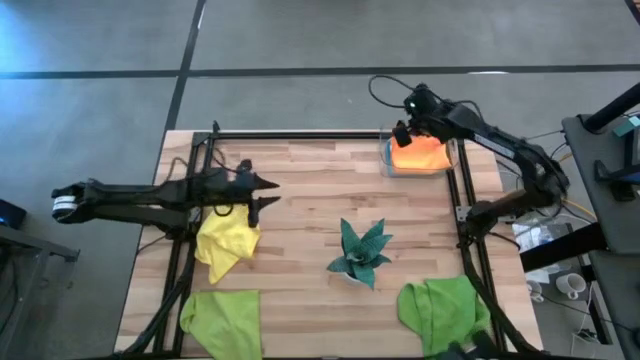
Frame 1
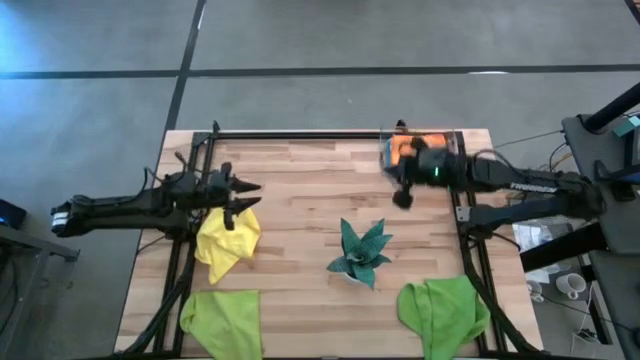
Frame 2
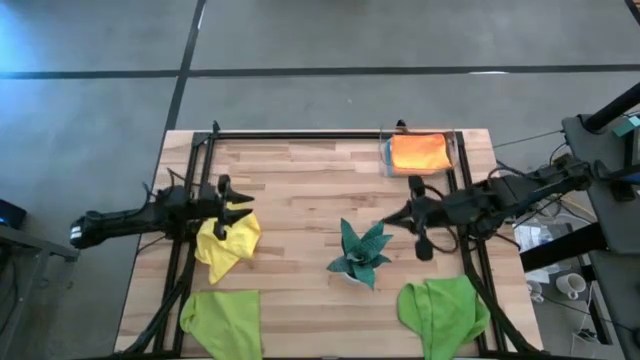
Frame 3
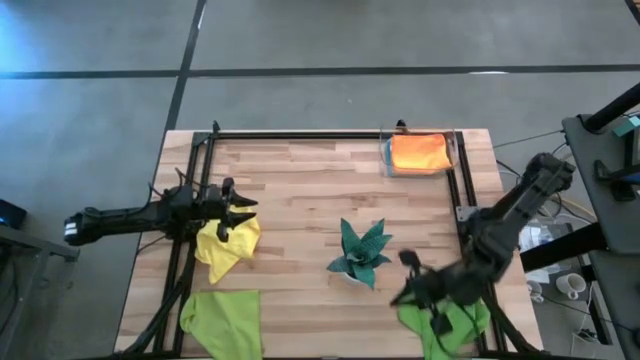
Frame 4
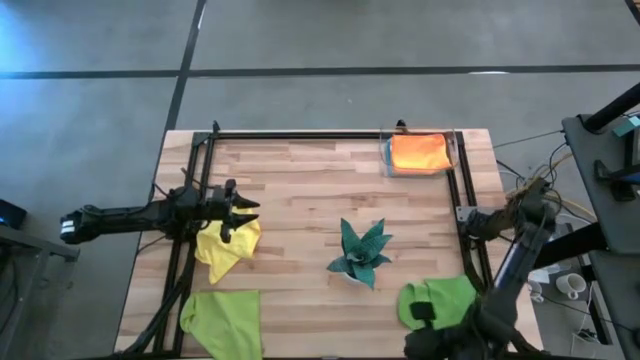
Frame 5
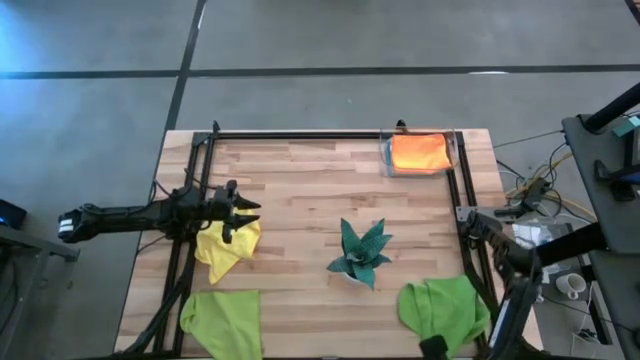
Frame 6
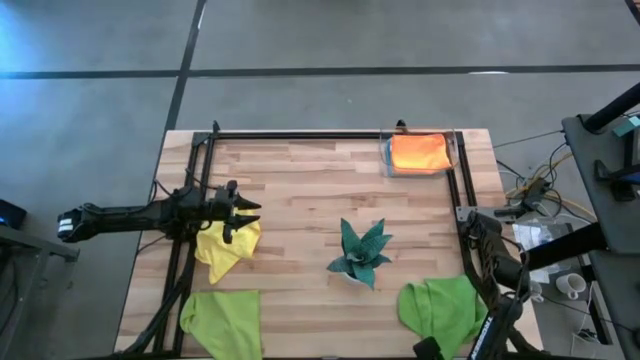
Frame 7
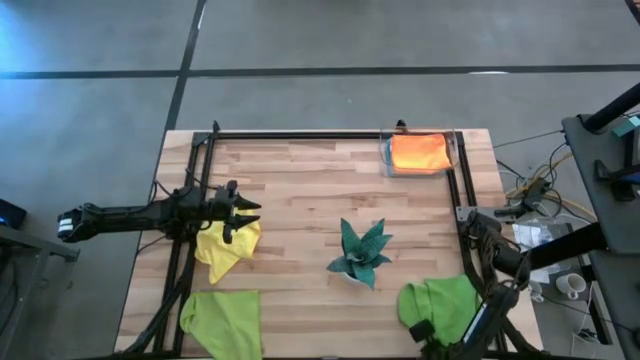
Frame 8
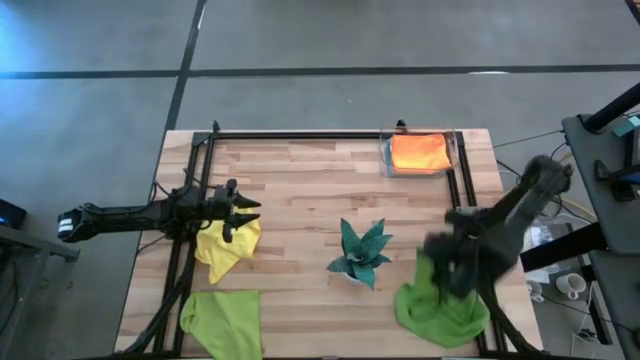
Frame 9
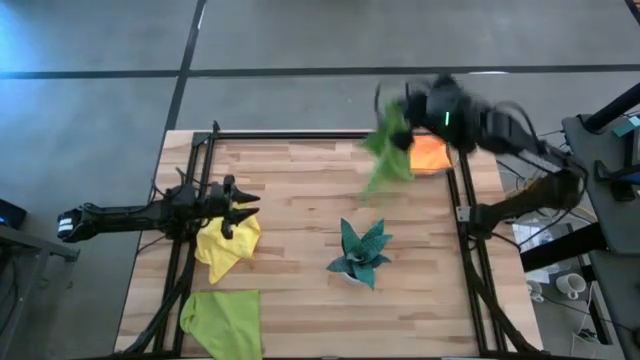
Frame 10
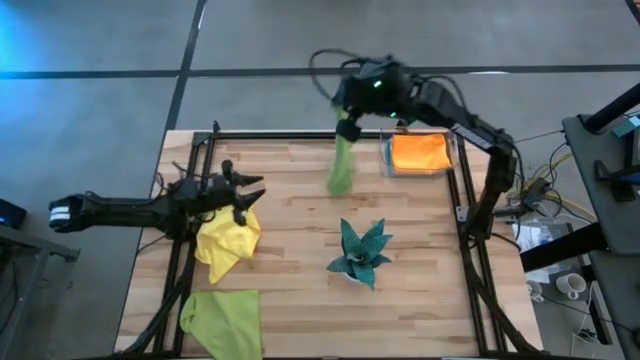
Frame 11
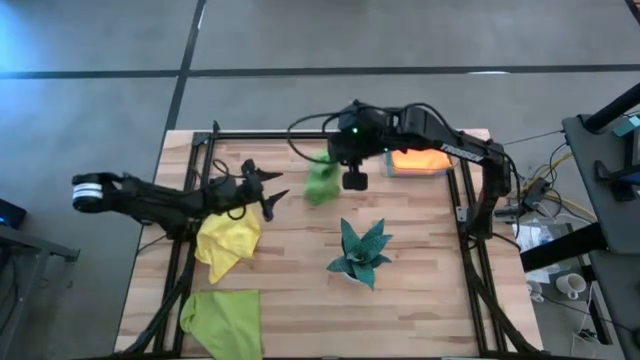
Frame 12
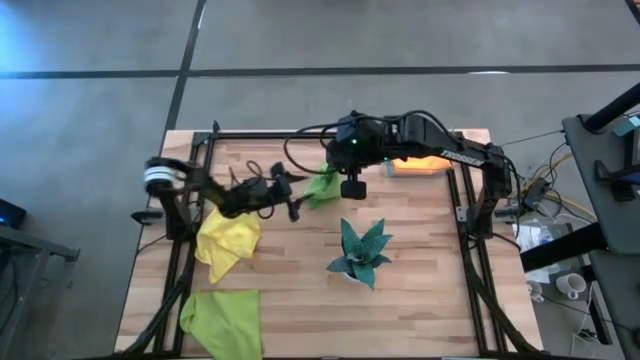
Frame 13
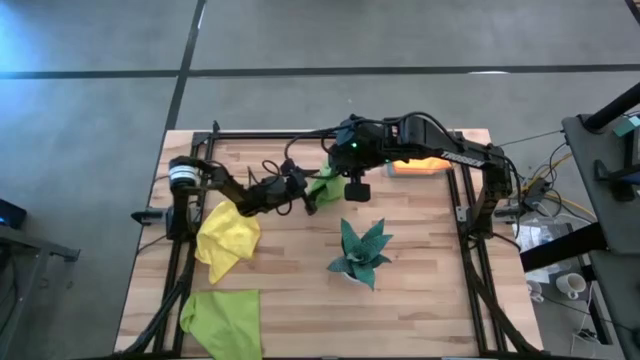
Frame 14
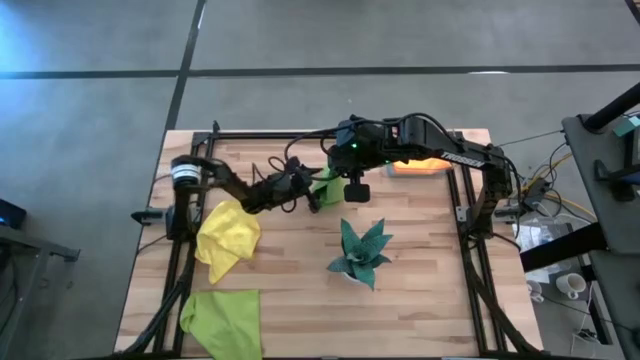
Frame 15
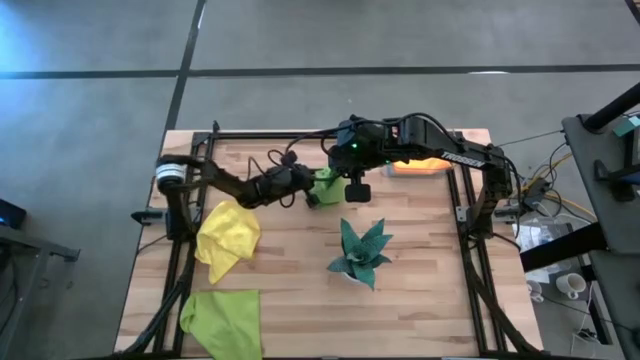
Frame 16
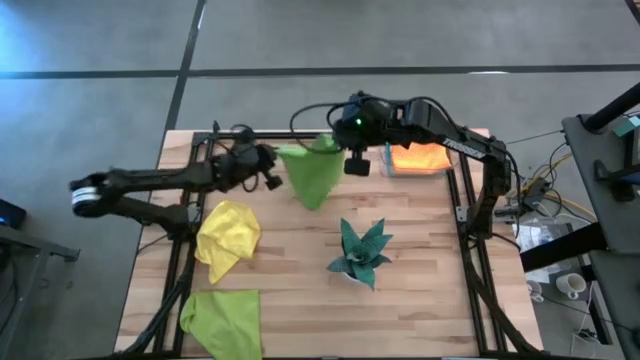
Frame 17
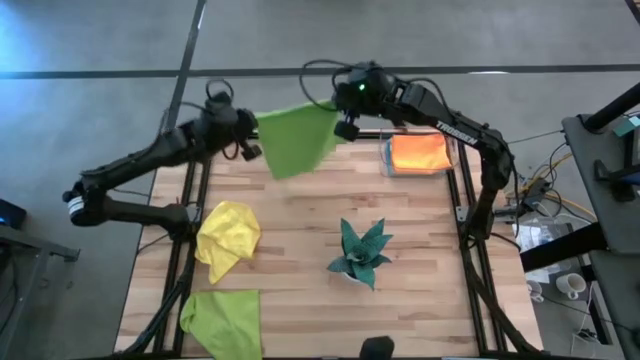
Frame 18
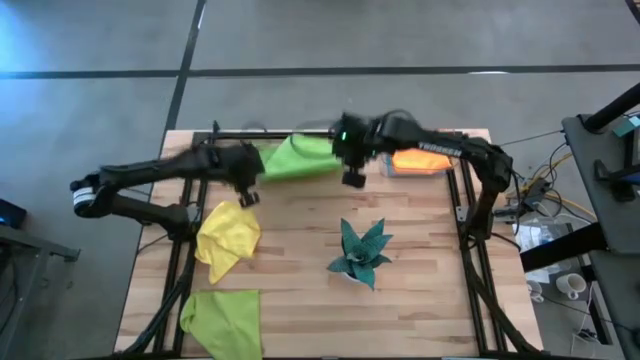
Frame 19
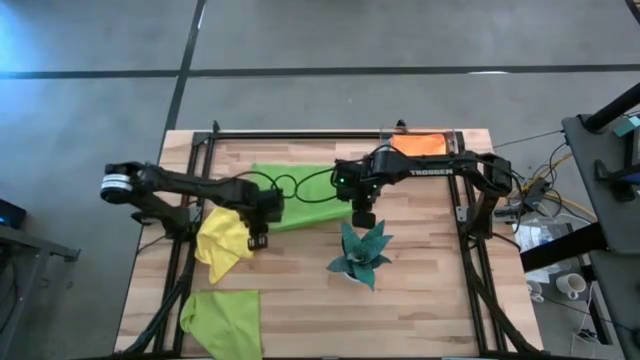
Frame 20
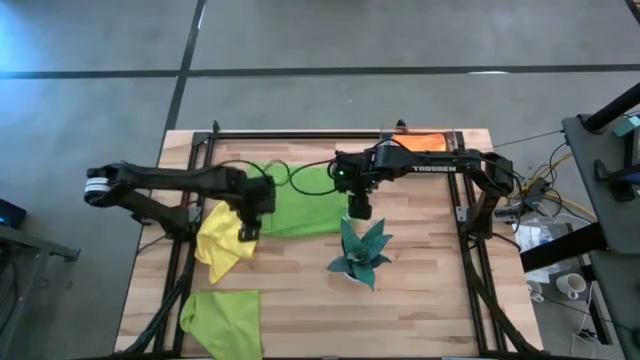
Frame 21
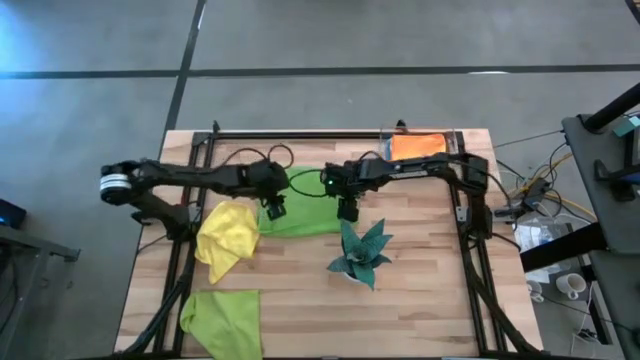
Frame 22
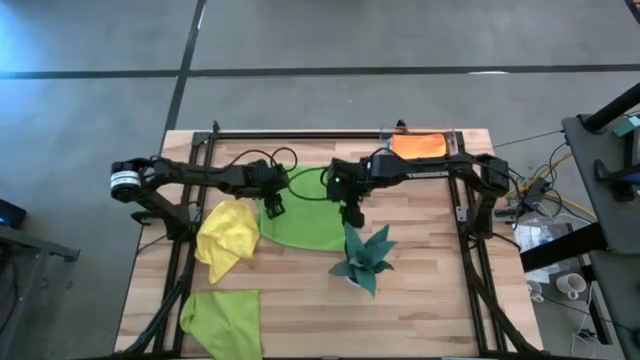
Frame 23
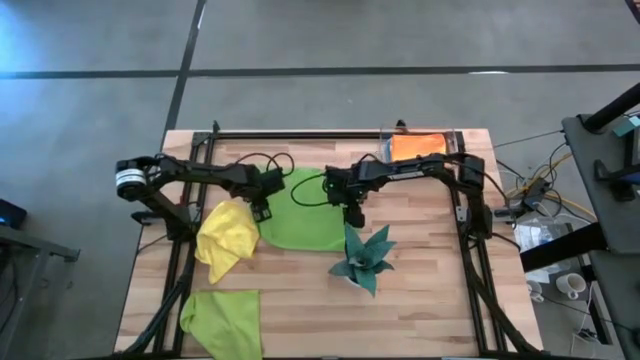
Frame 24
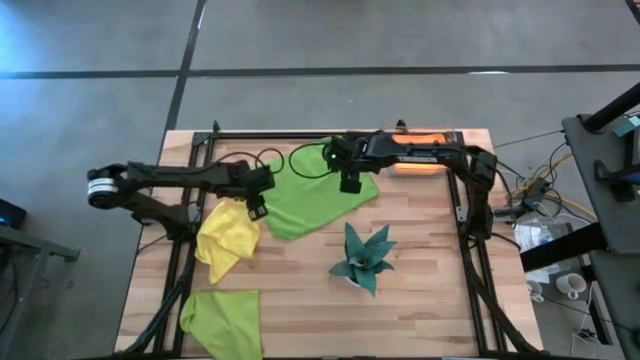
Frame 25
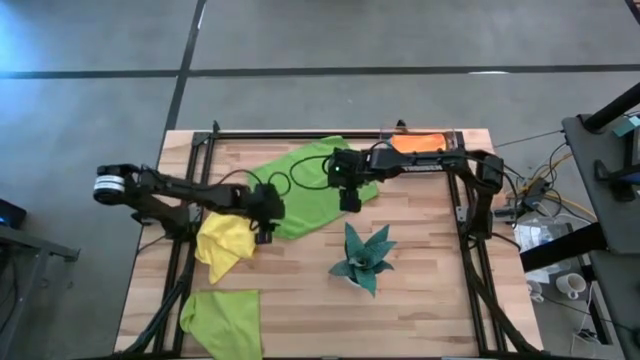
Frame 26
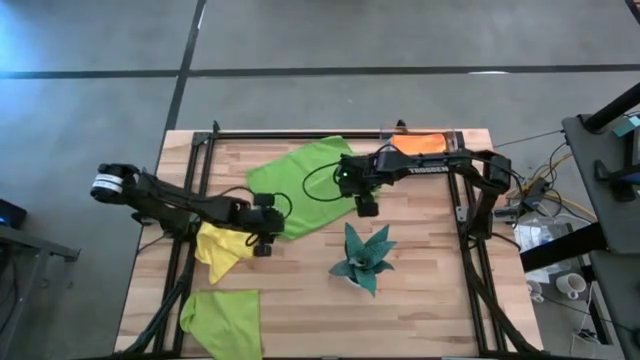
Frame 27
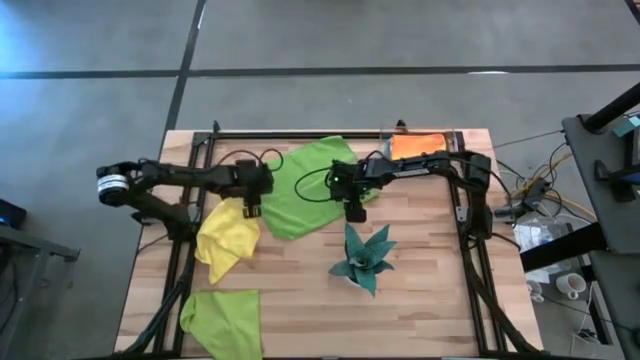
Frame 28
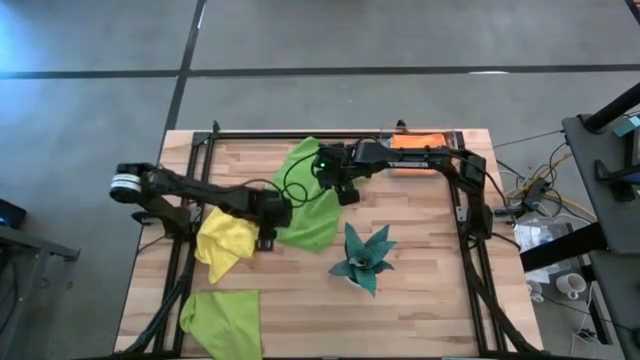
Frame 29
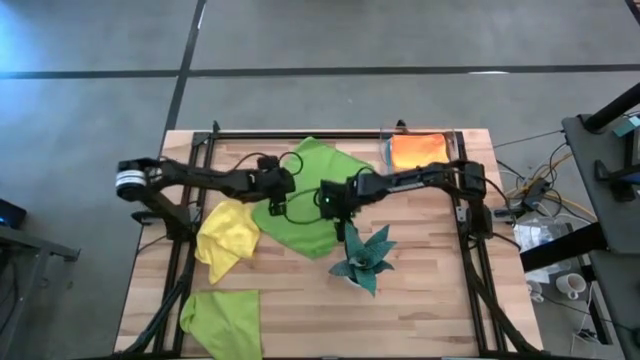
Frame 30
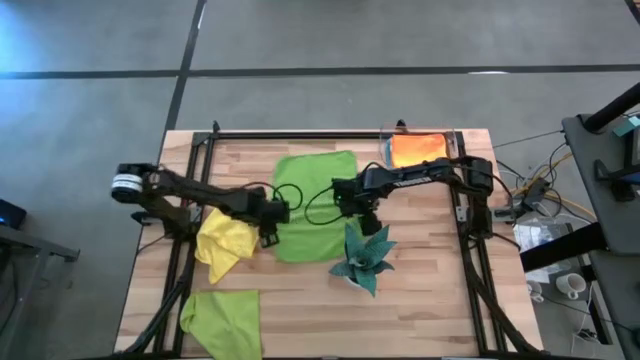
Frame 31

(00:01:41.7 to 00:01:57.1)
Task: Fold microfiber towels
Fold the green microfiber cloth

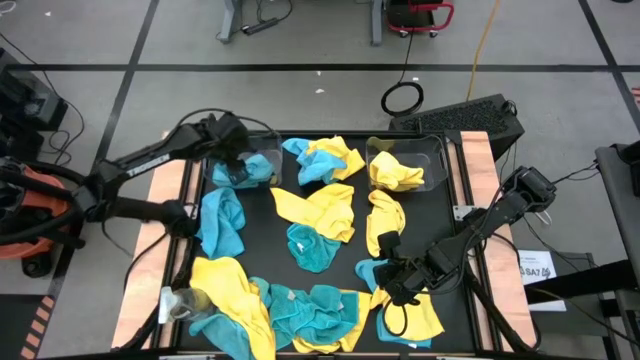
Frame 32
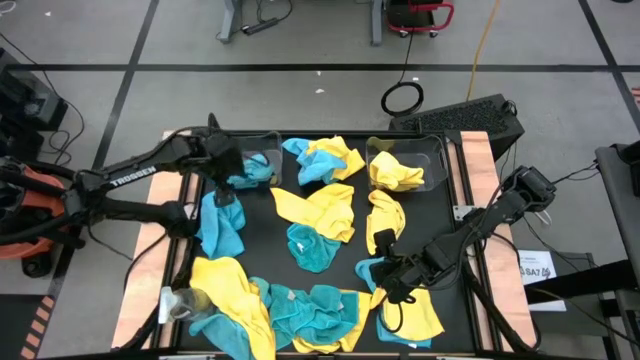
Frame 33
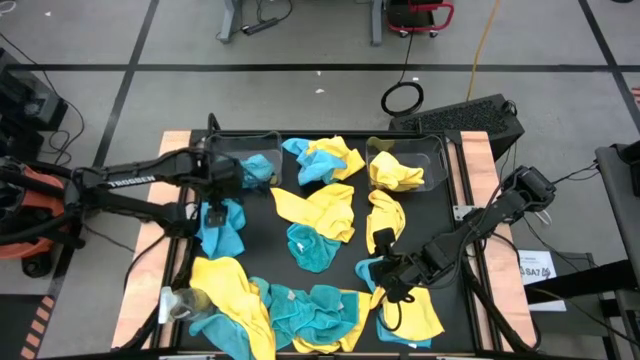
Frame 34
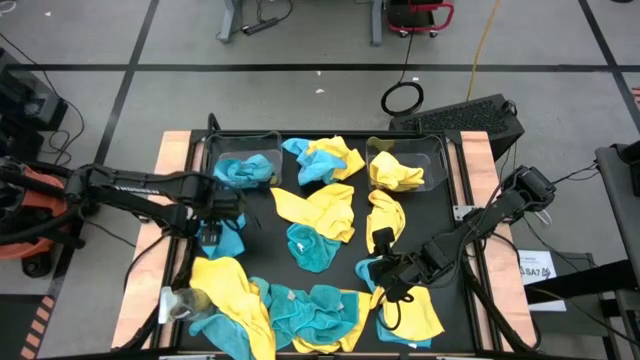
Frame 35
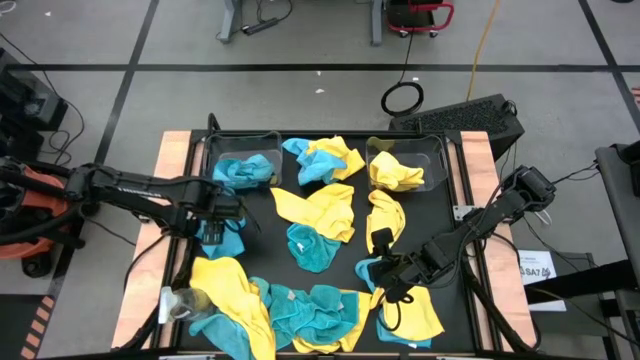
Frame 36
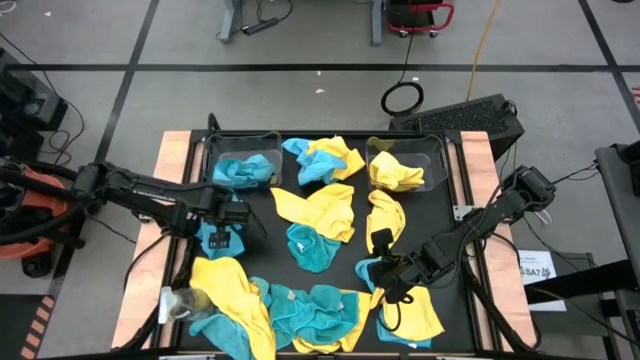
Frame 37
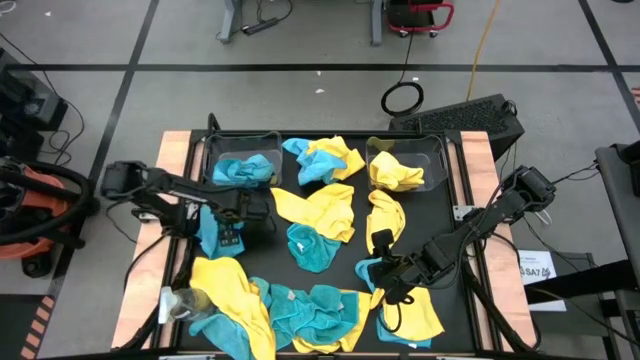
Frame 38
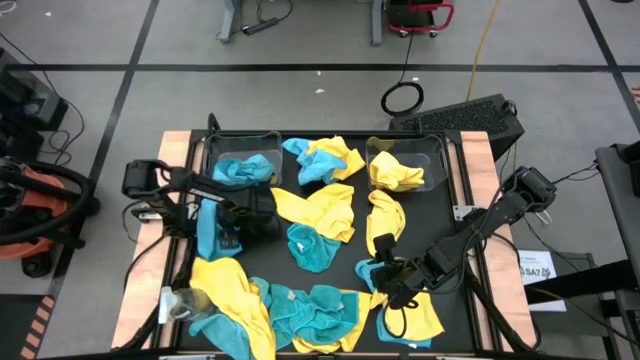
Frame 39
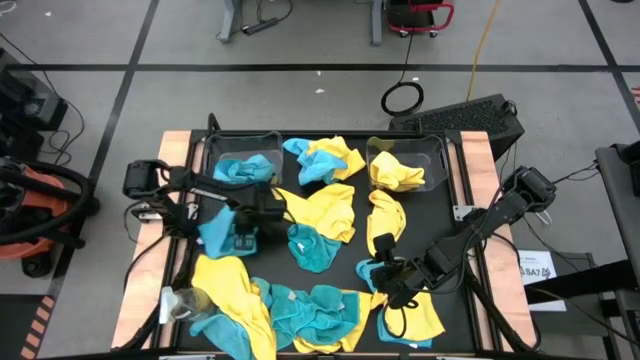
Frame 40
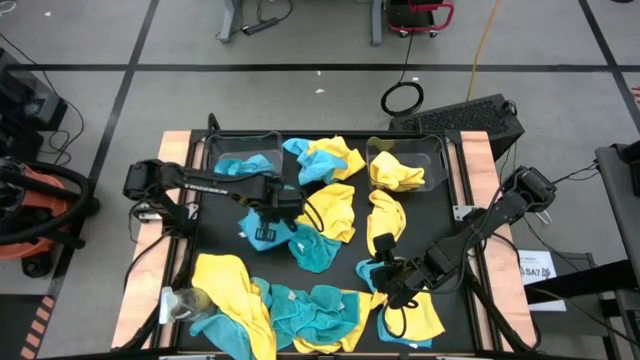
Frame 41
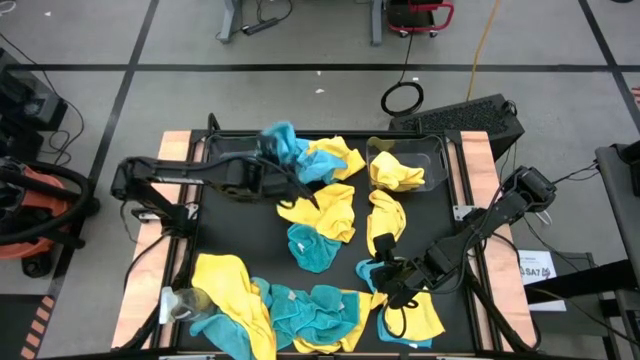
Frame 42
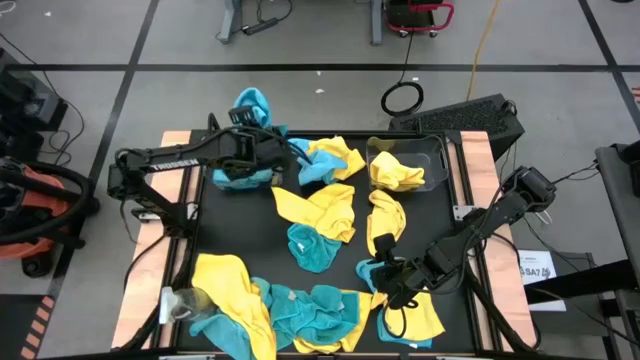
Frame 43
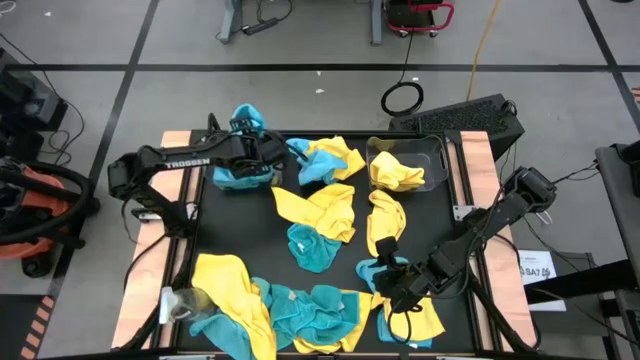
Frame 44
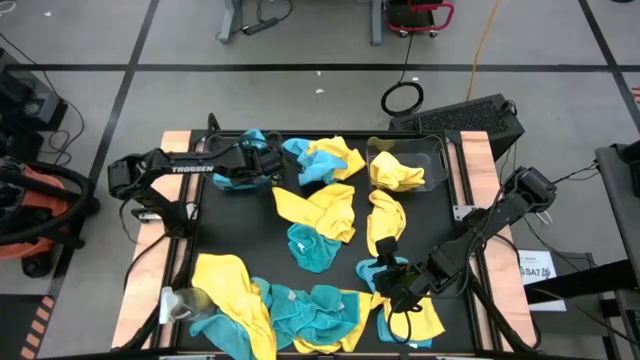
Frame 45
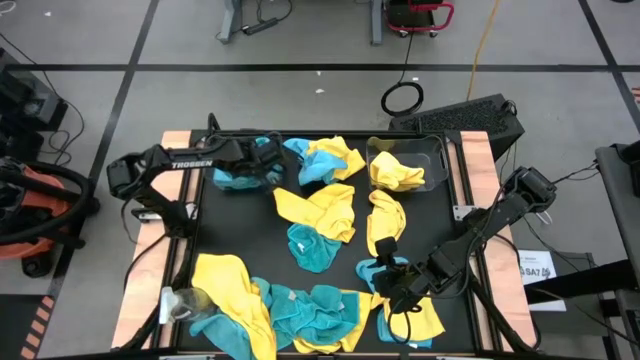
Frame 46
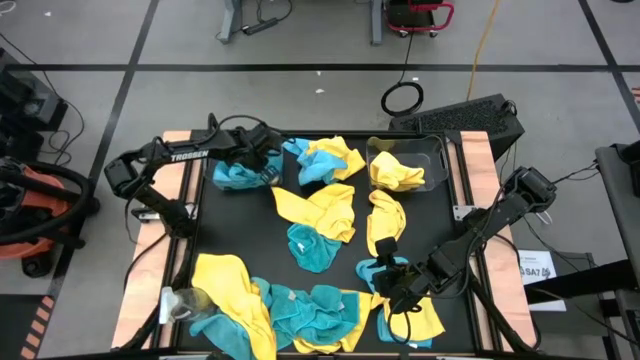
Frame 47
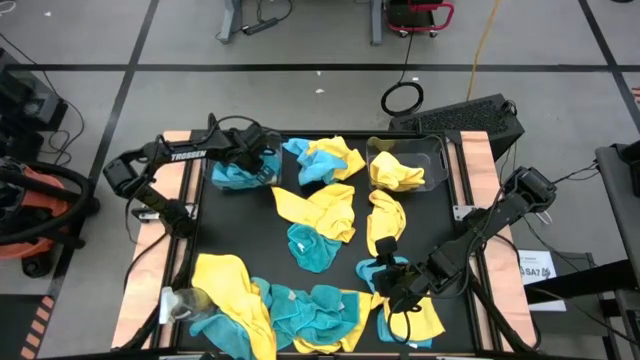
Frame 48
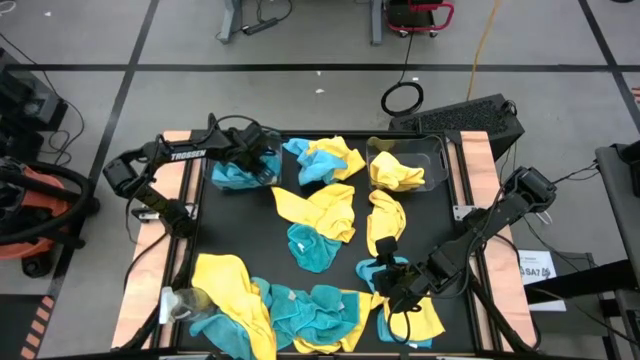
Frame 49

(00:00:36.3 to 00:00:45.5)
Task: Sort microfiber towel by color & place in baskets
Put the blue microfiber cloth into the left transparent bin
